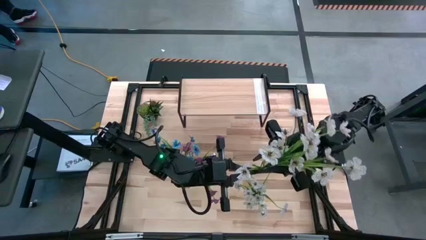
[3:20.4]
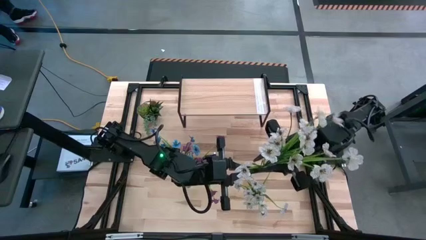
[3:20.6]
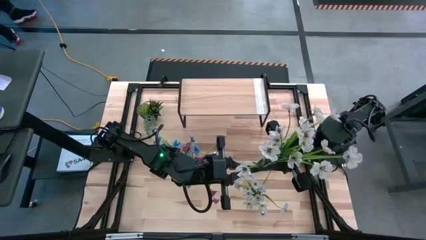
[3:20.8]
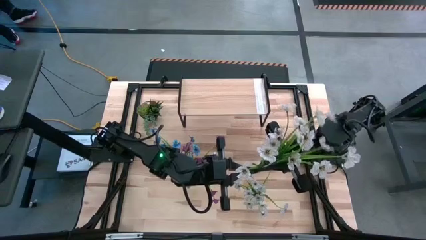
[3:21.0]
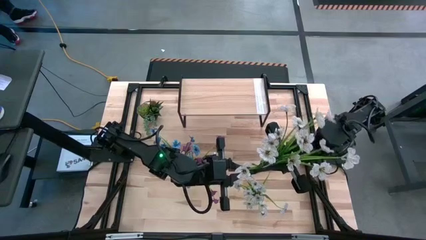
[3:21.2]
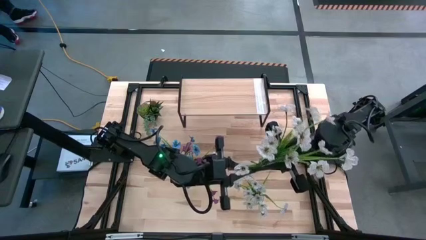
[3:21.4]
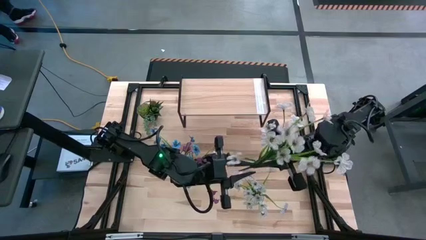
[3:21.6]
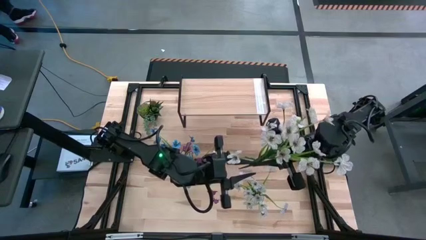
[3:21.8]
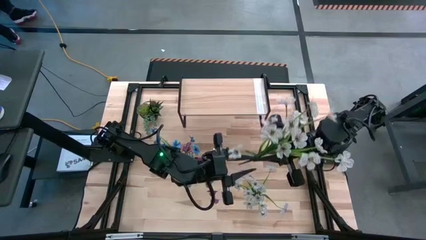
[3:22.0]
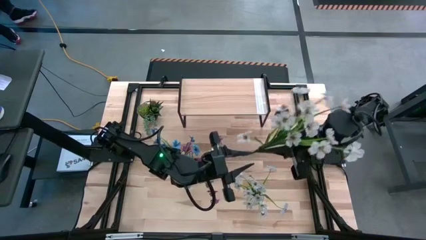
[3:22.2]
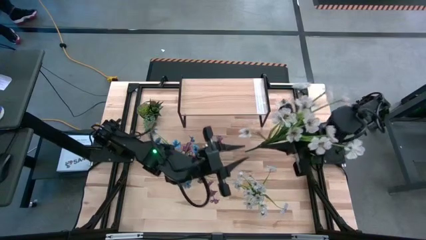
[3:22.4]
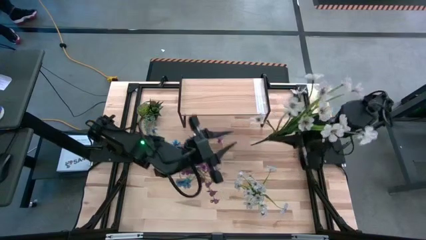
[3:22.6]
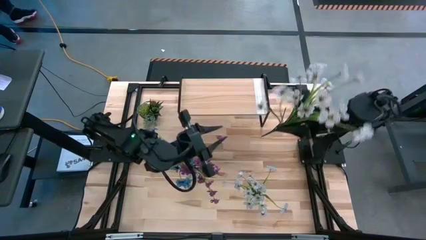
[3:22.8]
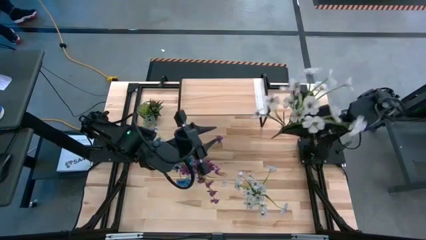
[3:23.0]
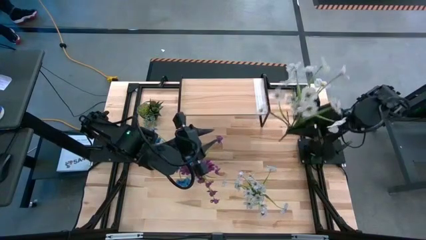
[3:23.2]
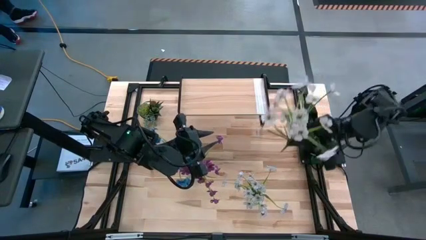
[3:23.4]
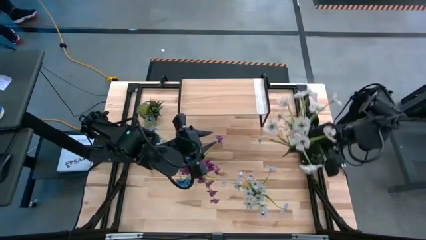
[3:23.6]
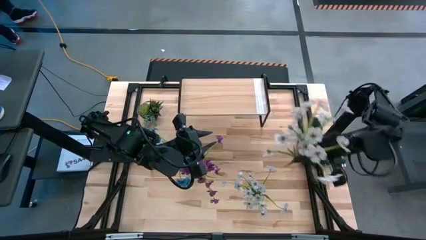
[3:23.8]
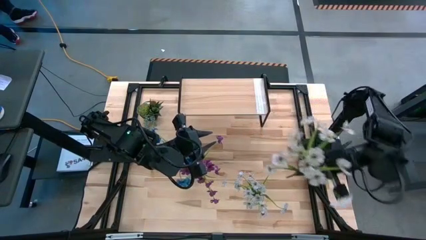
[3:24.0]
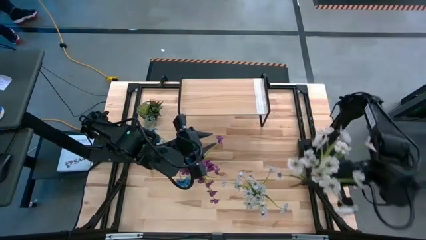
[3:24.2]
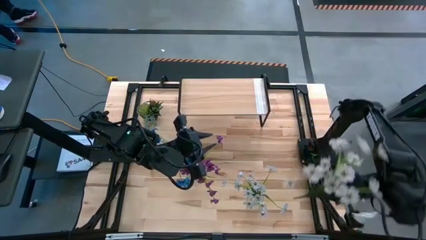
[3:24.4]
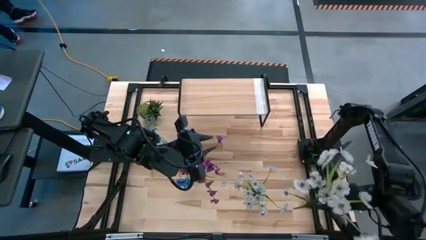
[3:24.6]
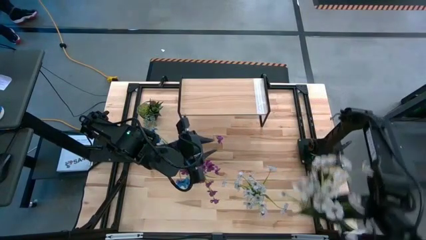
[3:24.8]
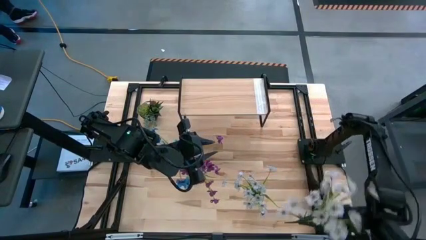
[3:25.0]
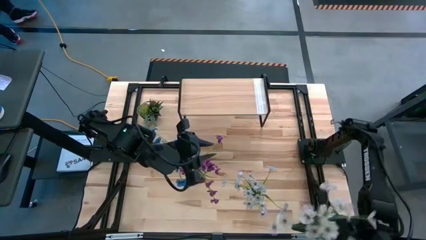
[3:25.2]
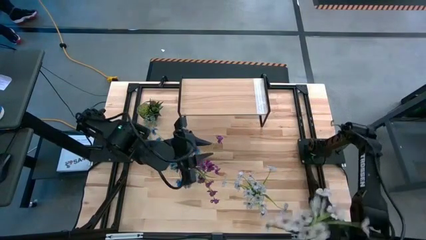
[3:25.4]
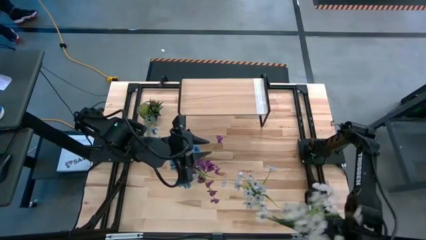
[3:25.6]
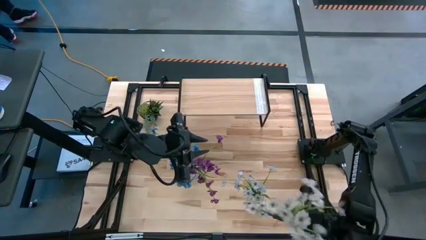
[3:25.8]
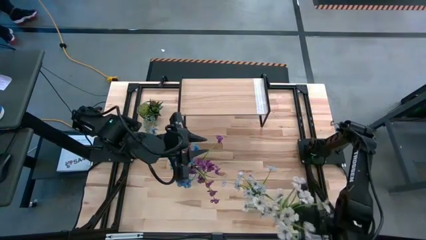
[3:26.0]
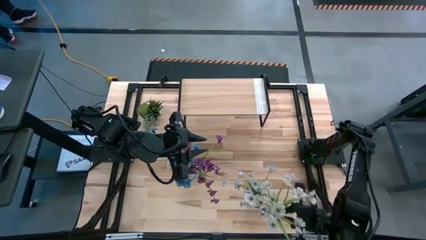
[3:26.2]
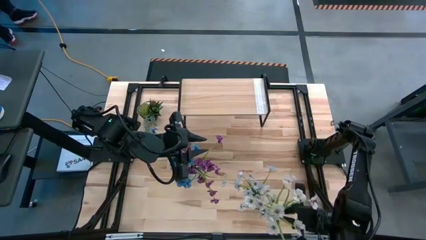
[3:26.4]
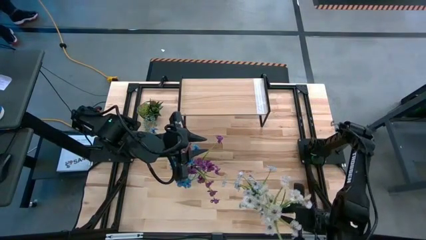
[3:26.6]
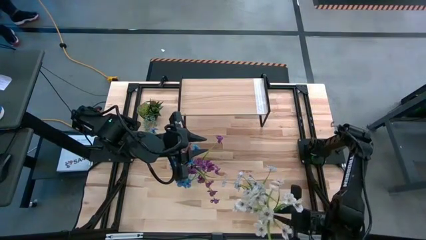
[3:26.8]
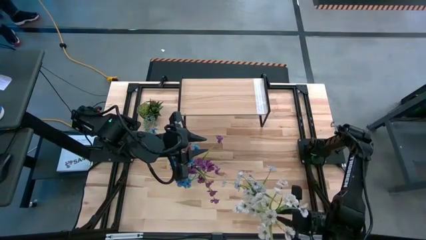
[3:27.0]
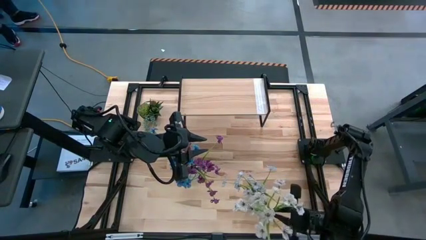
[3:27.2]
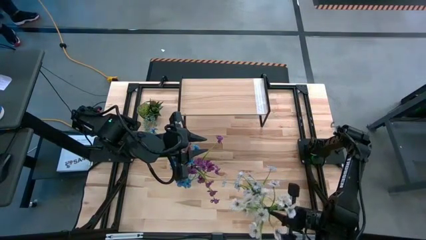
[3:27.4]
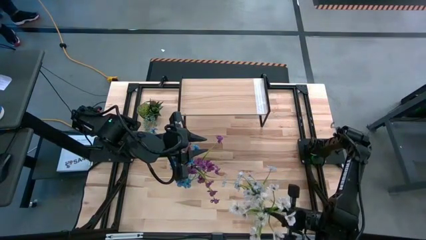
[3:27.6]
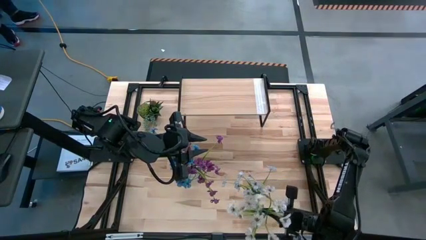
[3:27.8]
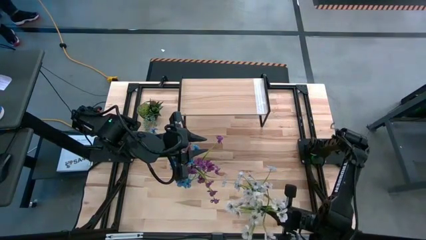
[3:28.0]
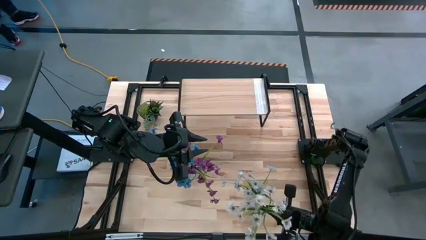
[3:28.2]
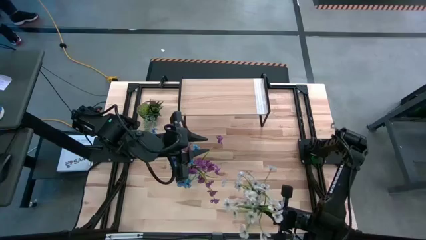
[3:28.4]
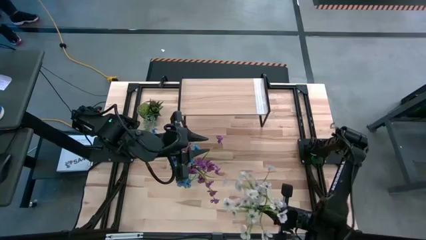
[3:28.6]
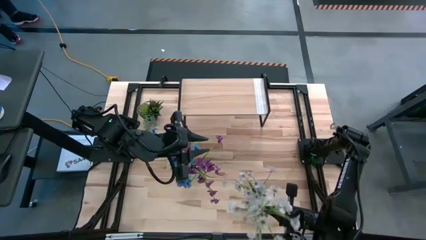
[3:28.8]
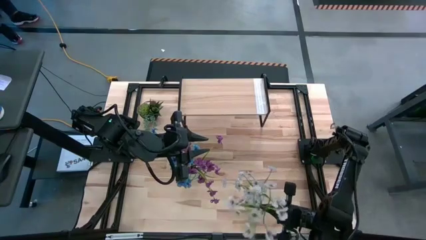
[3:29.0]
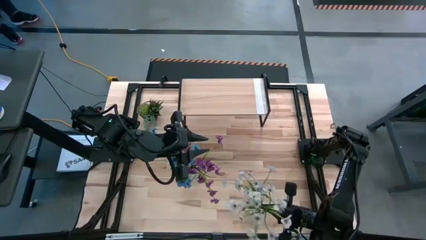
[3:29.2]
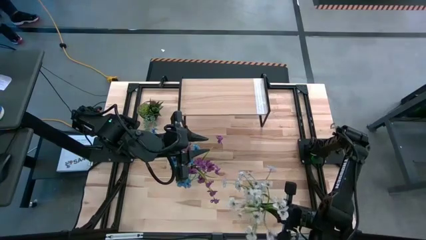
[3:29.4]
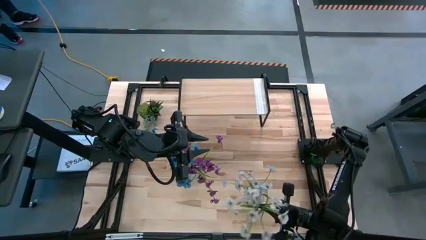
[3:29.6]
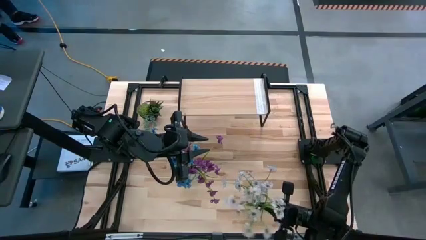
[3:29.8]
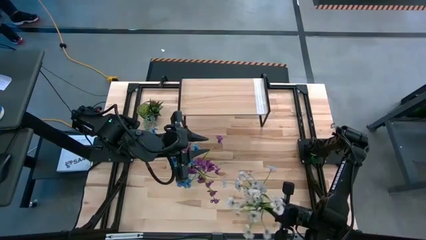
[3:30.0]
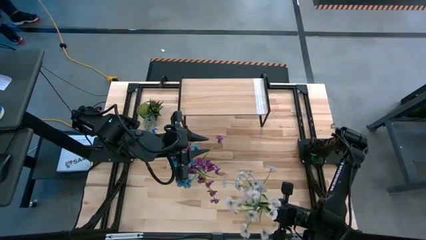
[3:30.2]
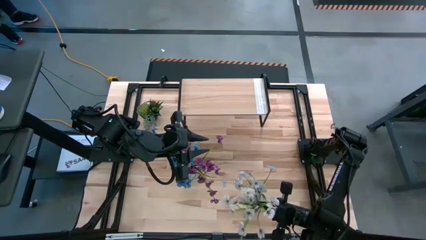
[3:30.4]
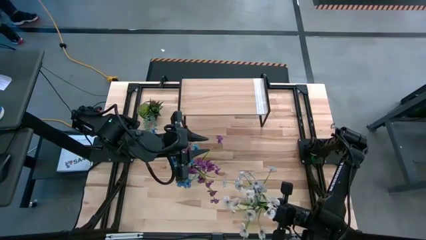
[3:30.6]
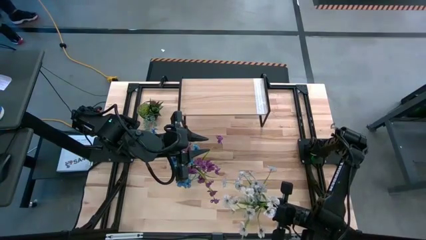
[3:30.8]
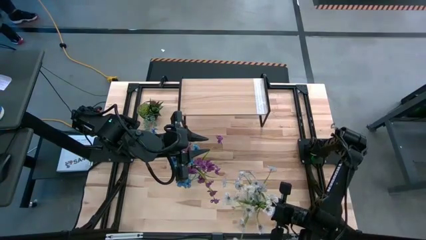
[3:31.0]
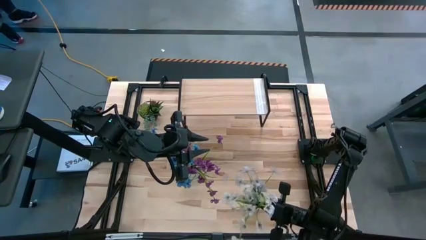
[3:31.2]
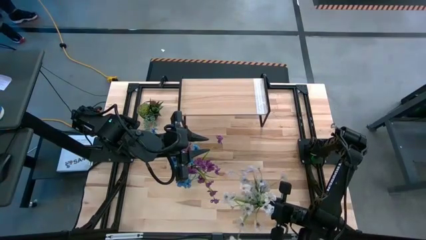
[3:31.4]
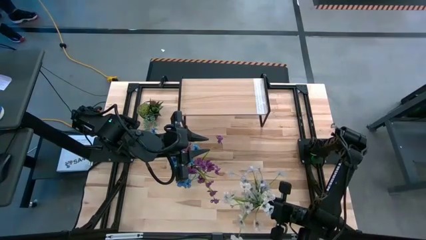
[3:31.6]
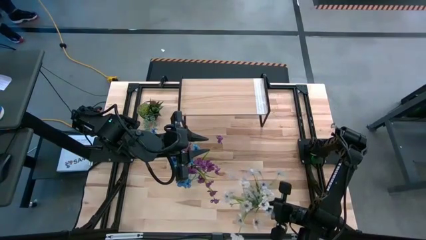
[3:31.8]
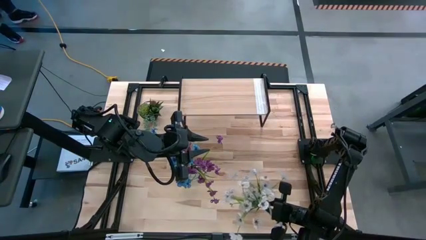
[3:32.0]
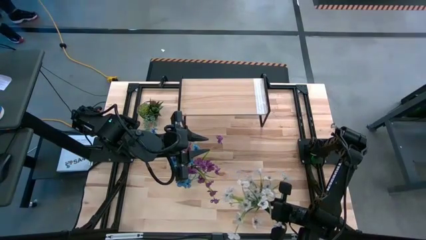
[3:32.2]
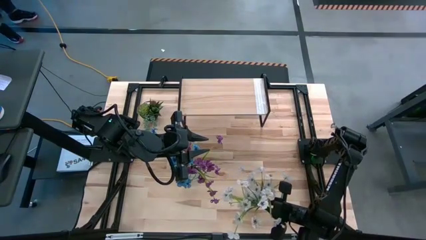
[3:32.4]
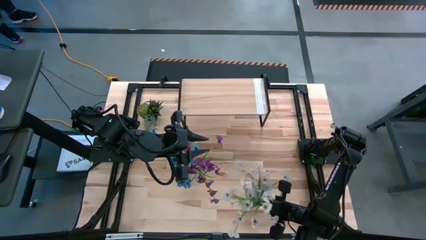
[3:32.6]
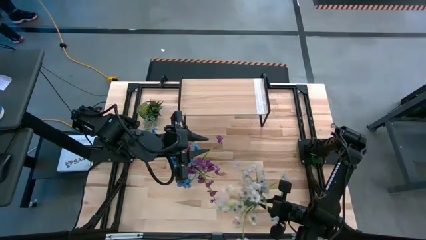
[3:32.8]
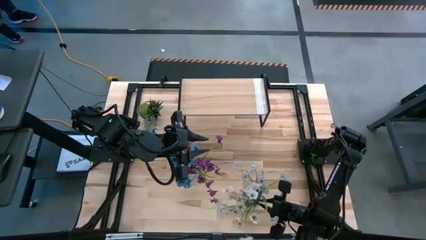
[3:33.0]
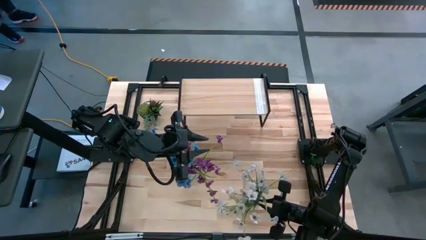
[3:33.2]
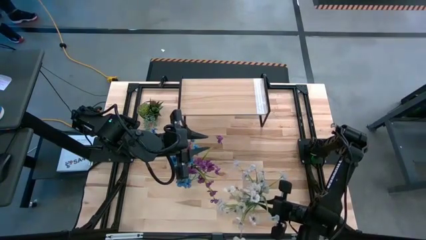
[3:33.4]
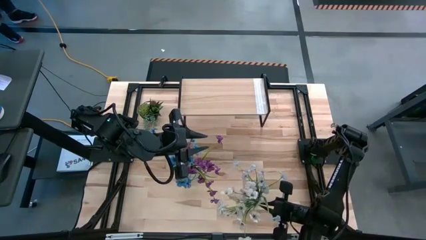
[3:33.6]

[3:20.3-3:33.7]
Task: Pick and place flowers into a vace then onto a shelf
Put the white flowers into the right transparent vase

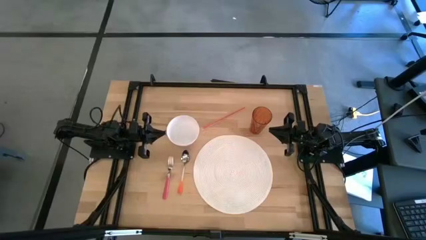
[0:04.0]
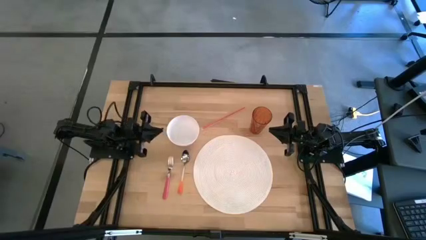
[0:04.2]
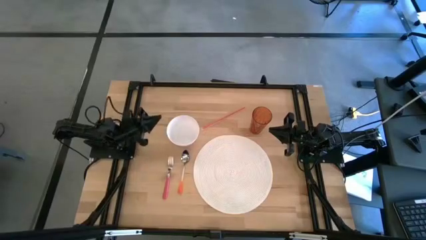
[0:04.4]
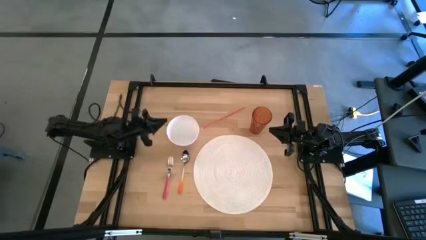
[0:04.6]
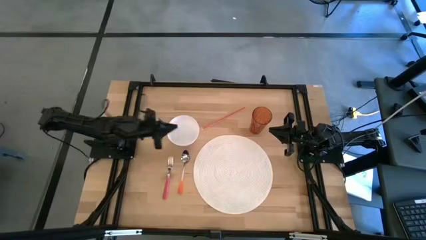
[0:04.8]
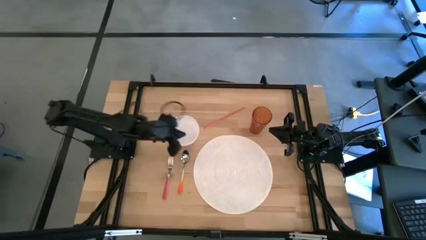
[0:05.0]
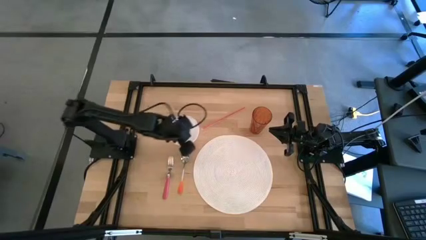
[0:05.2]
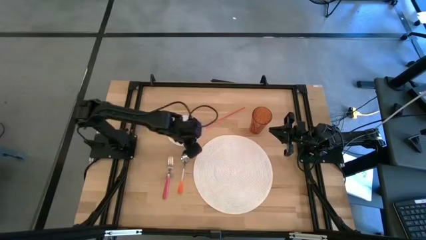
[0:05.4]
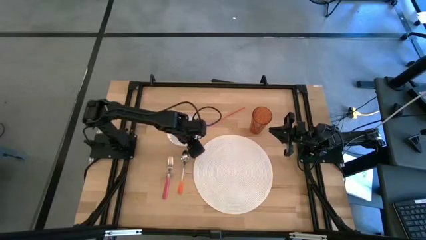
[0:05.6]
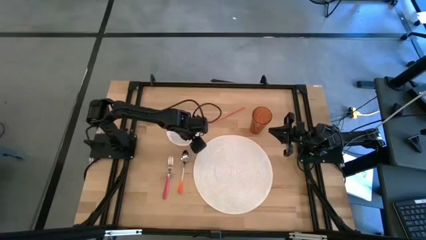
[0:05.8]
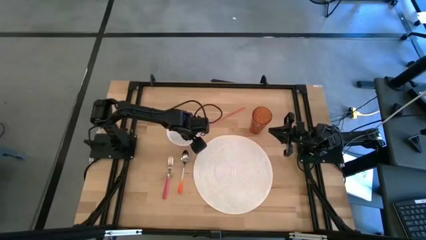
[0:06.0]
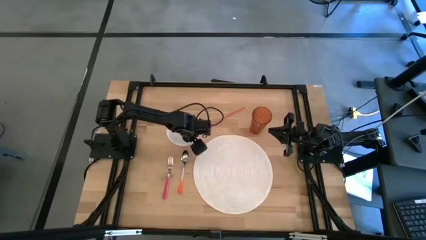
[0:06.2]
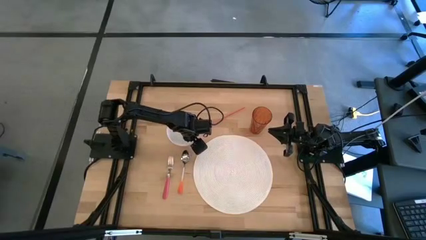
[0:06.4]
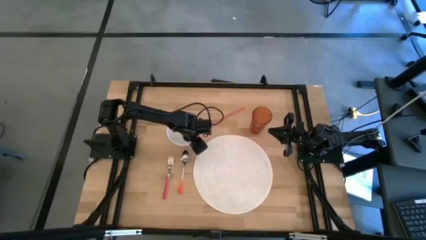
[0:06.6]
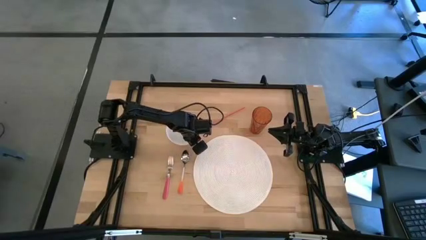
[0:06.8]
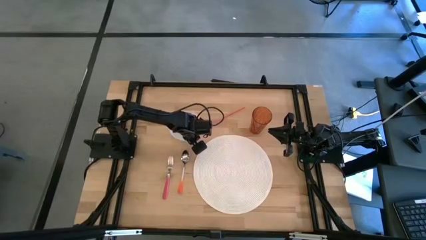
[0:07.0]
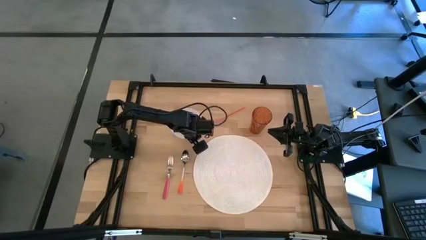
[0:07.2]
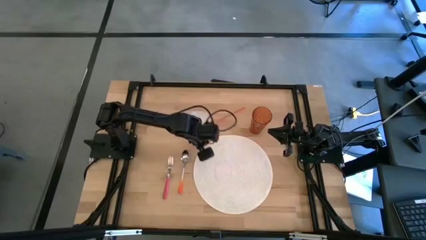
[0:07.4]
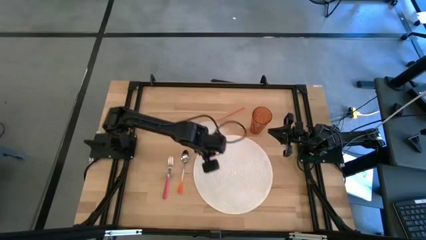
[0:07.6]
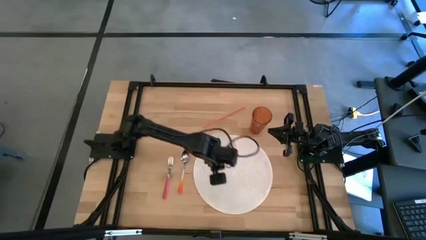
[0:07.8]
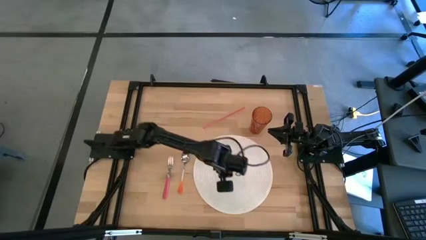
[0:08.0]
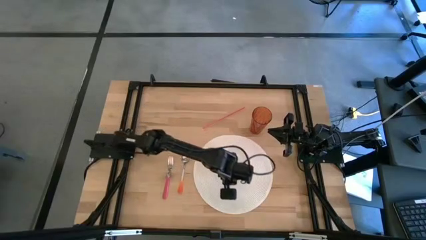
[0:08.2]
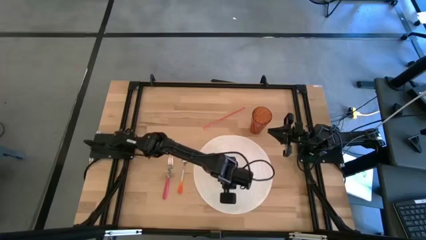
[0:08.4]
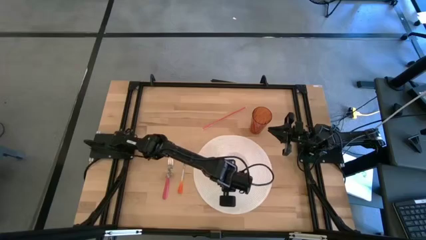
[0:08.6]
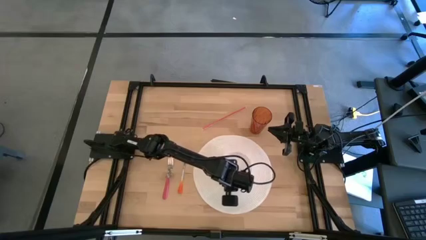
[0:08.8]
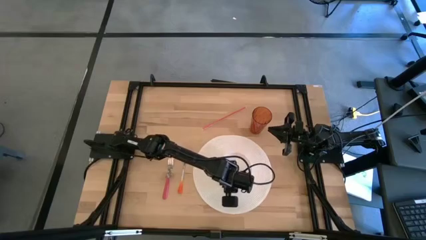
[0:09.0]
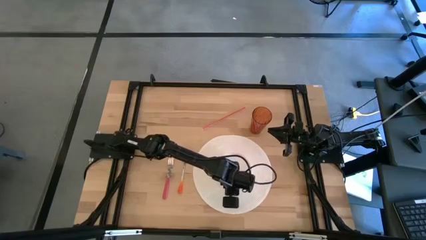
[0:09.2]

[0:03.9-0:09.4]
Task: Pick & Place Utensil
Put the white bowl on the white mat
